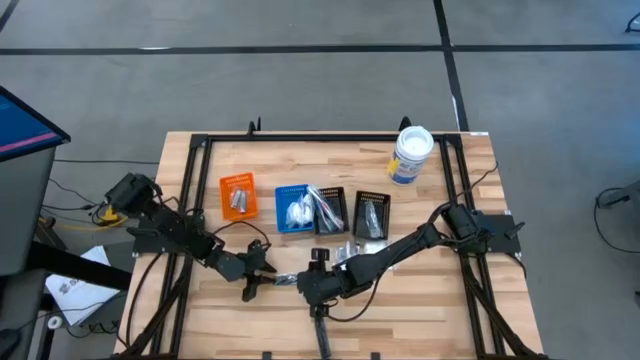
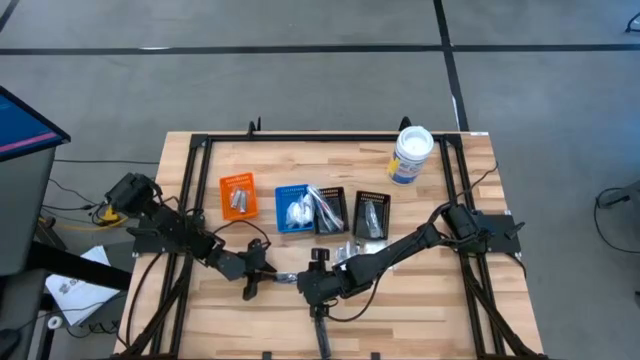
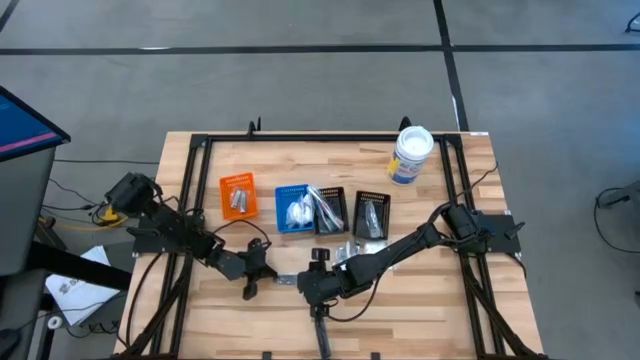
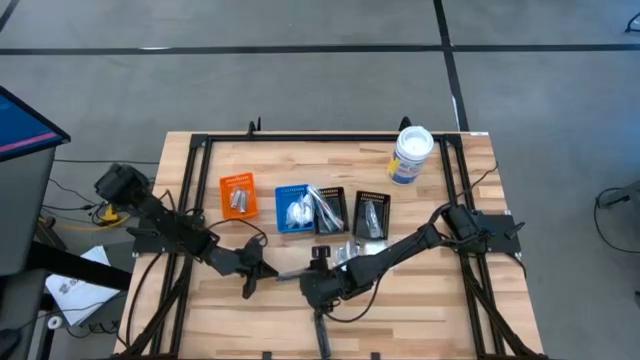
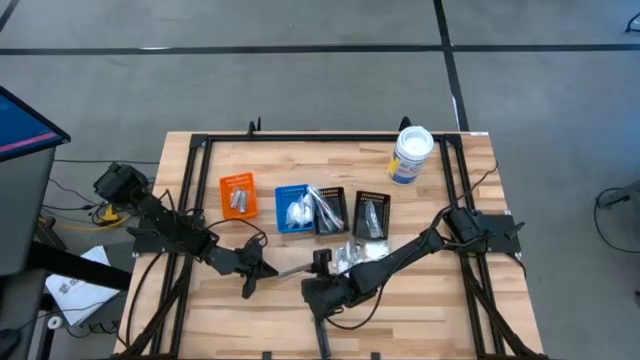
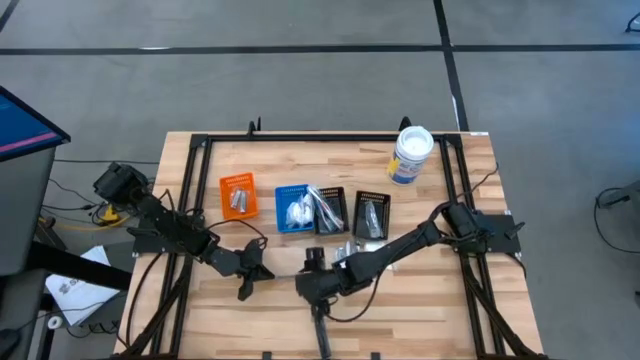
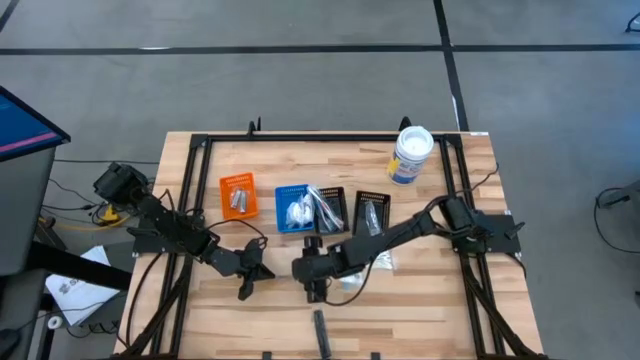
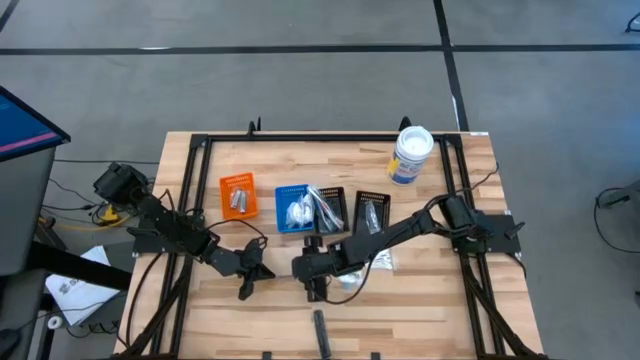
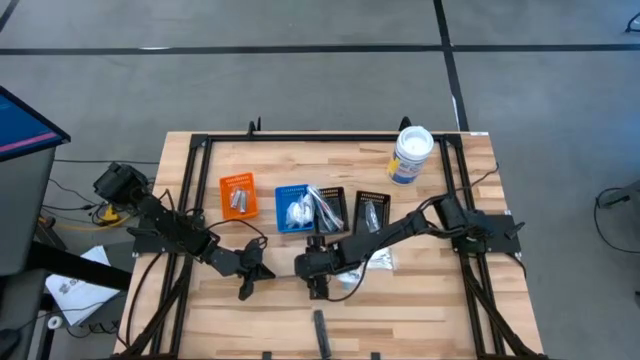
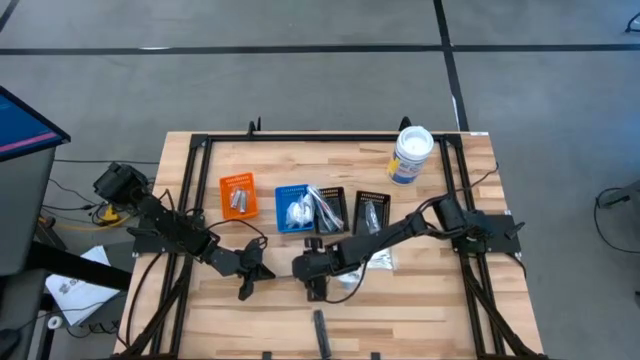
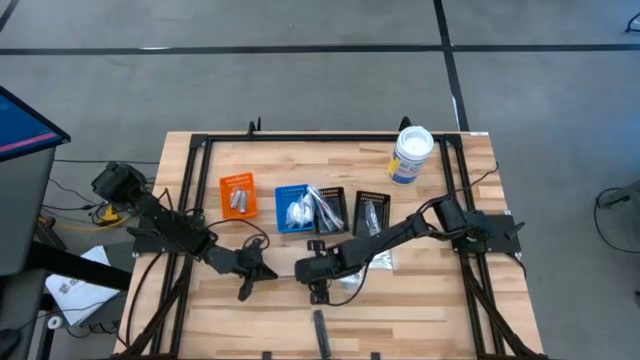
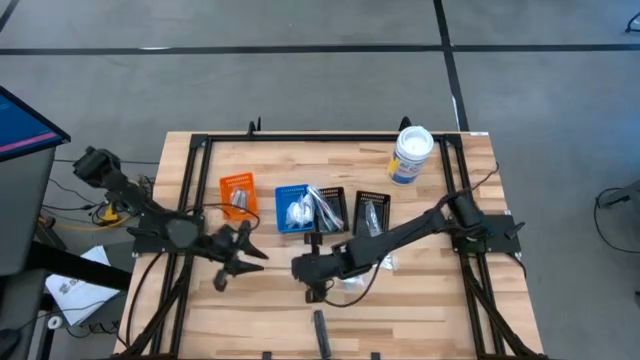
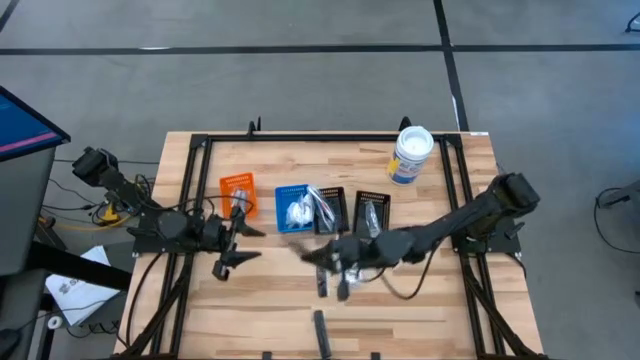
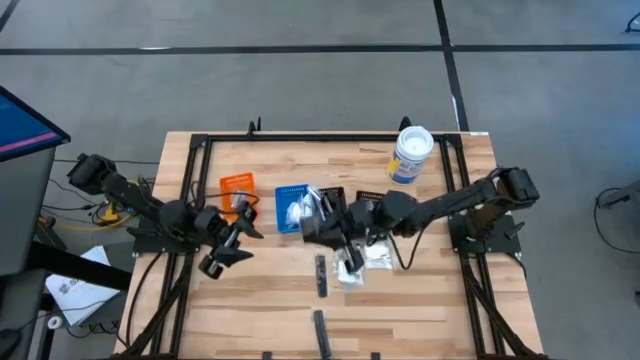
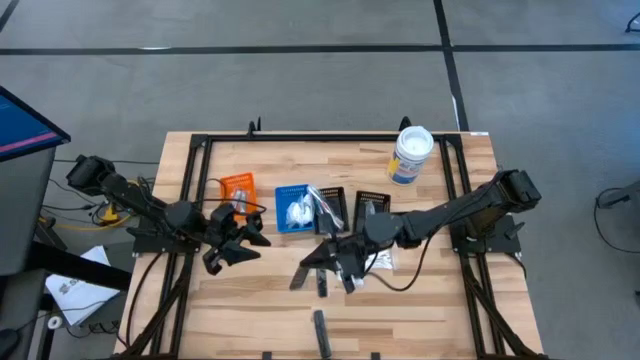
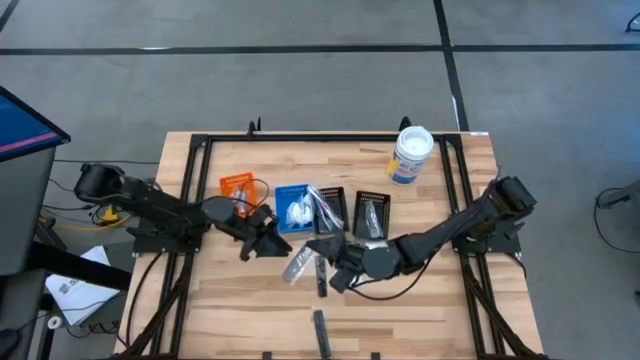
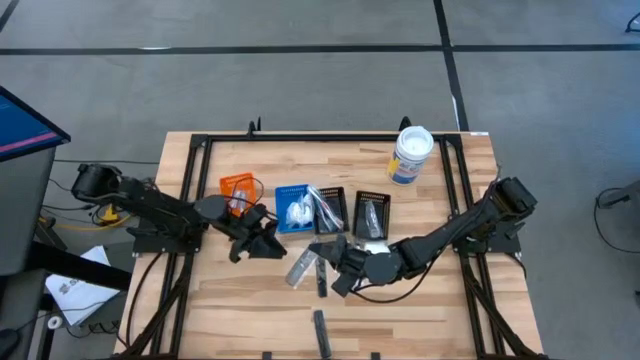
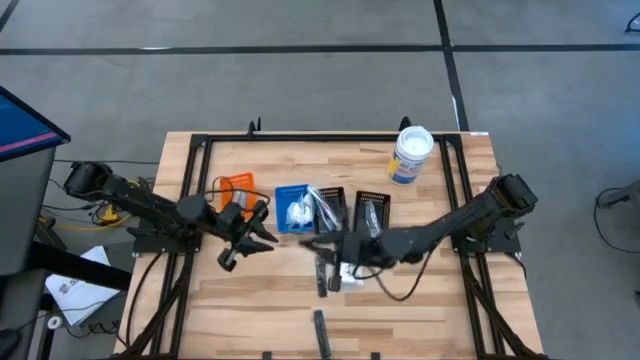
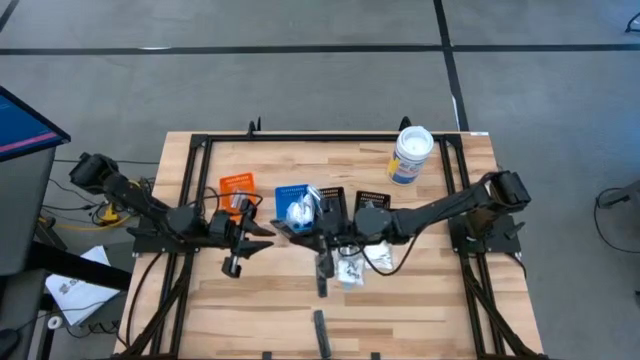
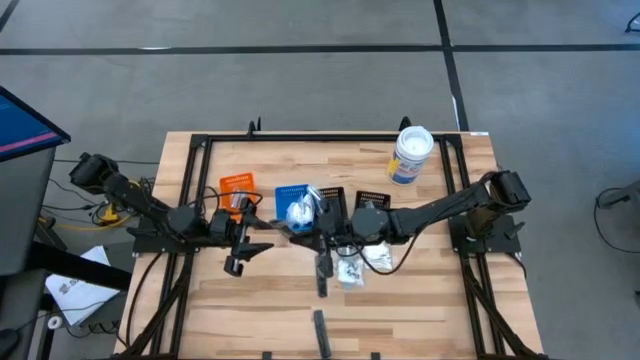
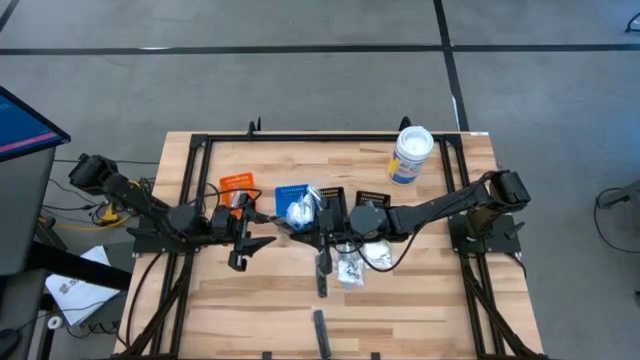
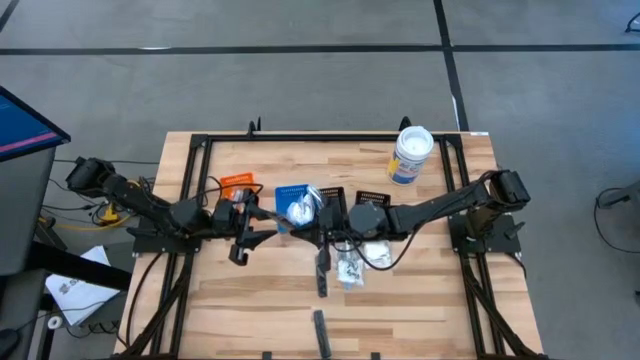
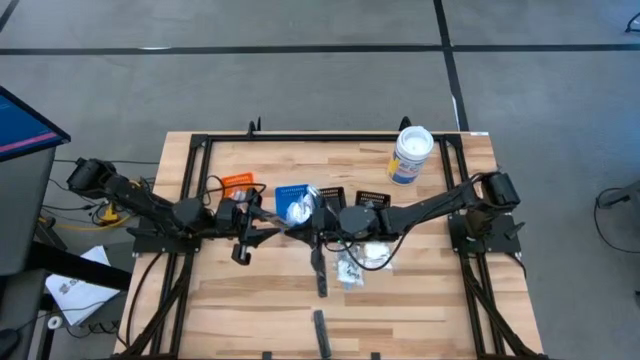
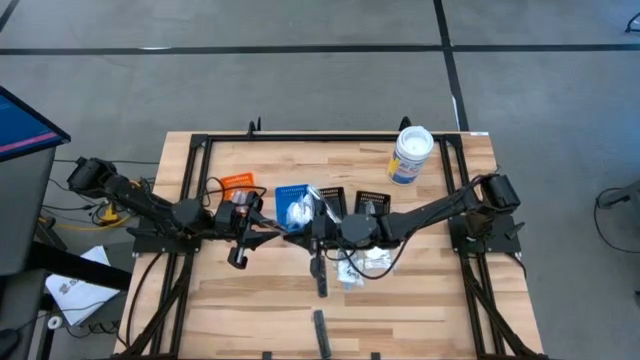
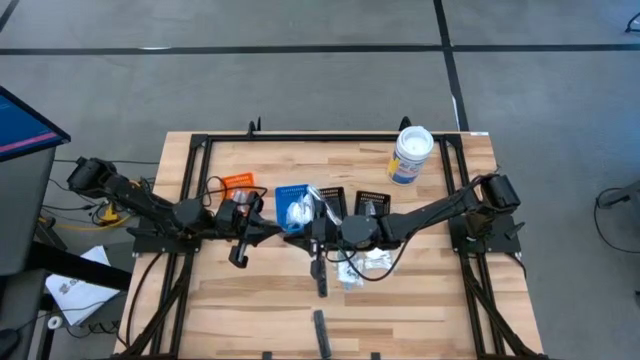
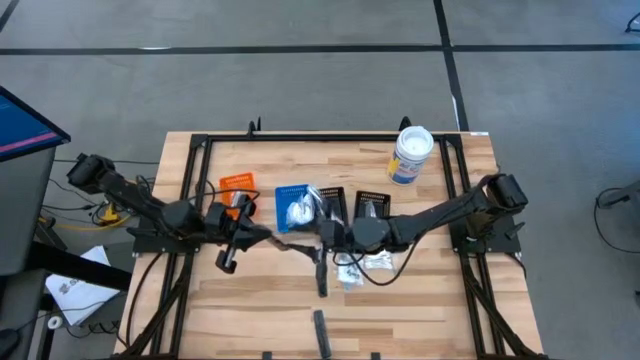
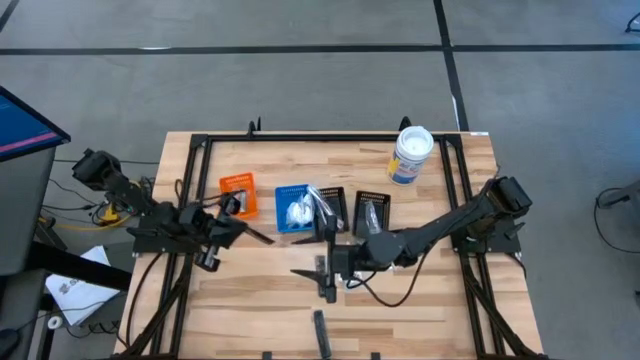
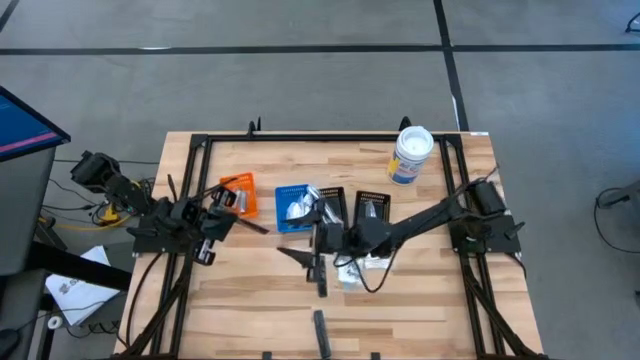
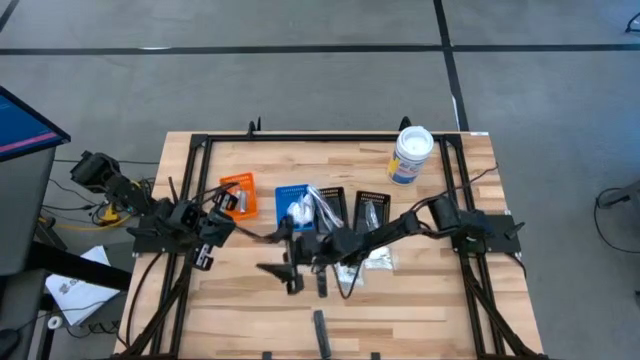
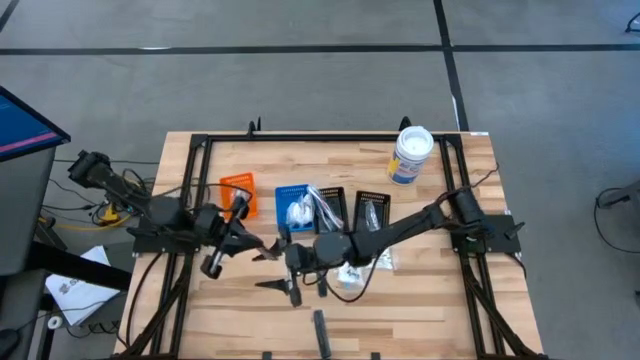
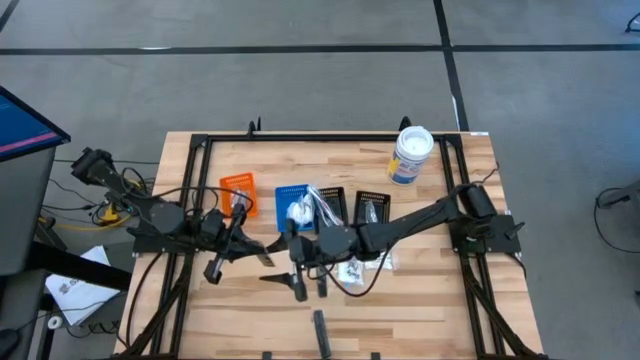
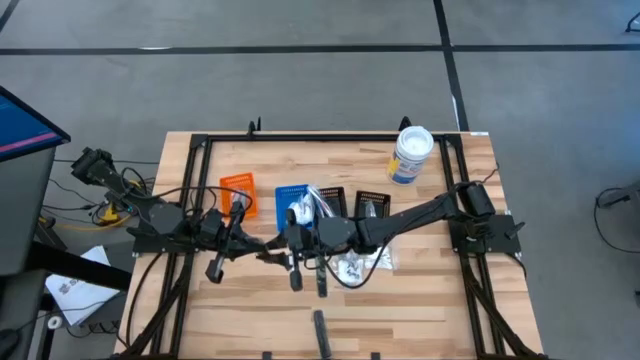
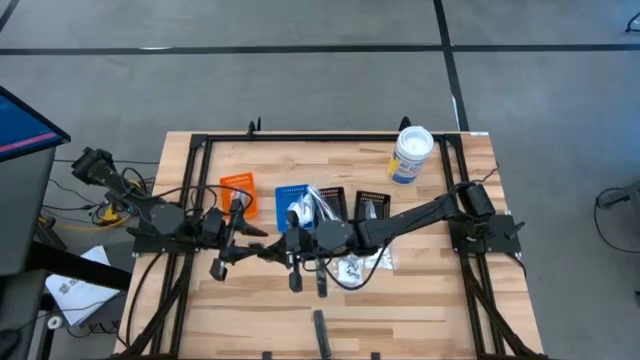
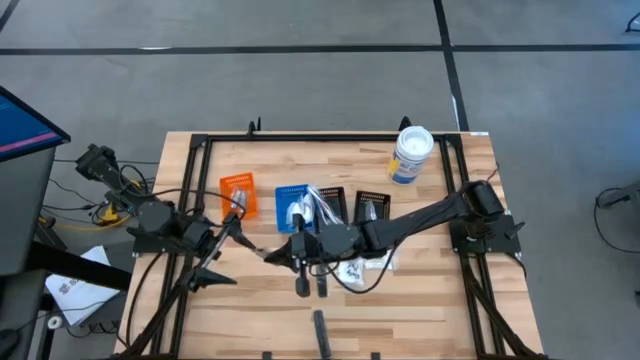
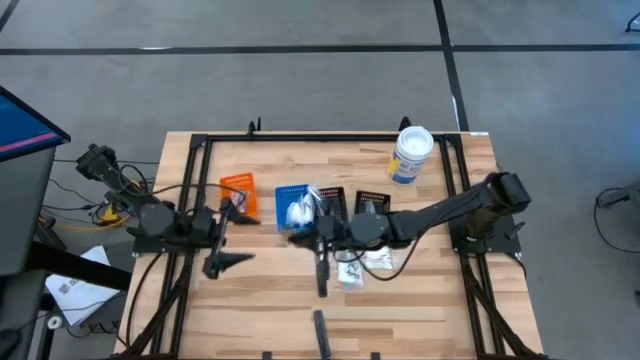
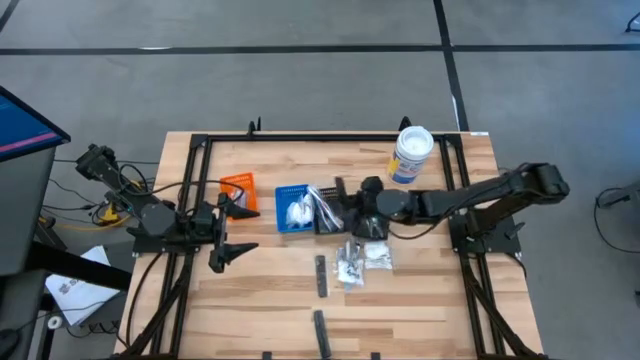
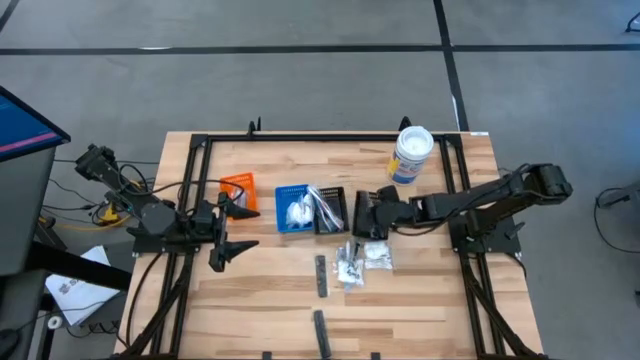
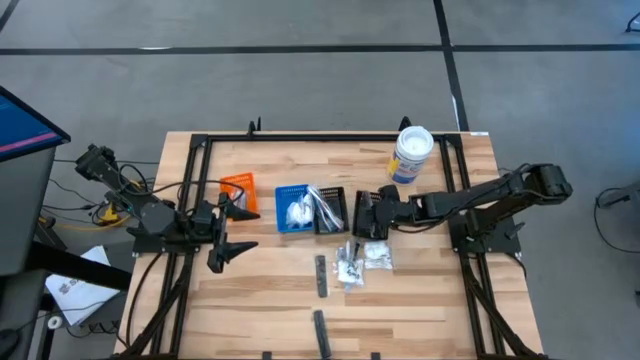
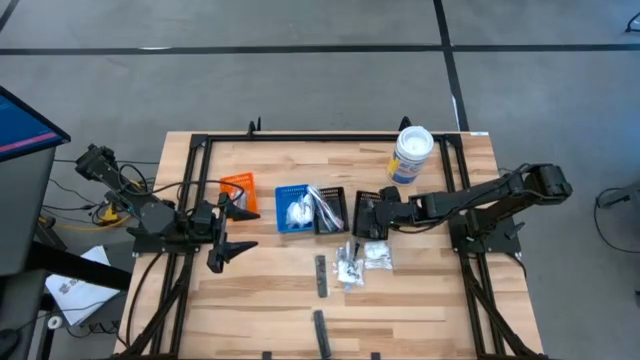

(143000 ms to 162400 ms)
Task: Pick & Place Travel size toiletries
Put the black comb into the right black bin

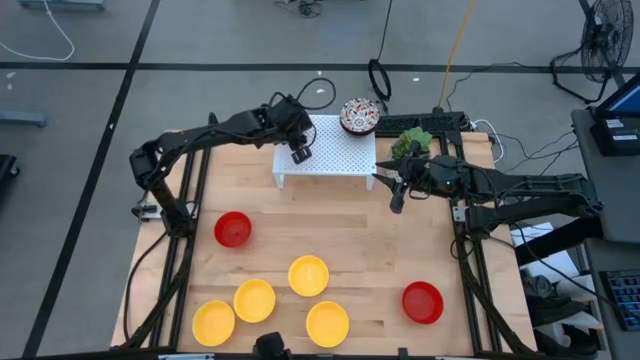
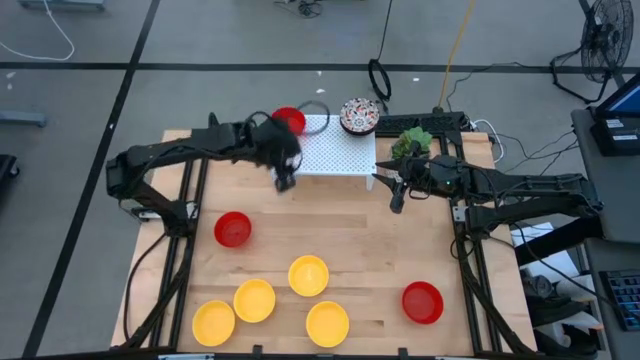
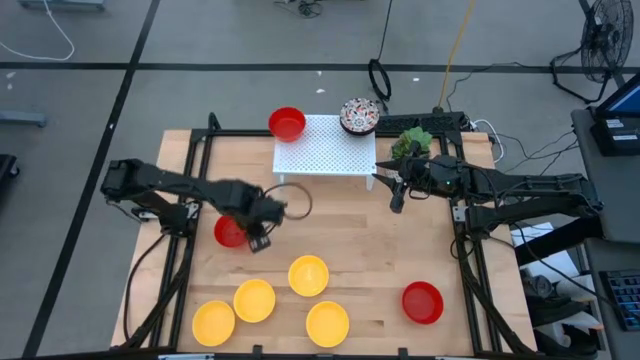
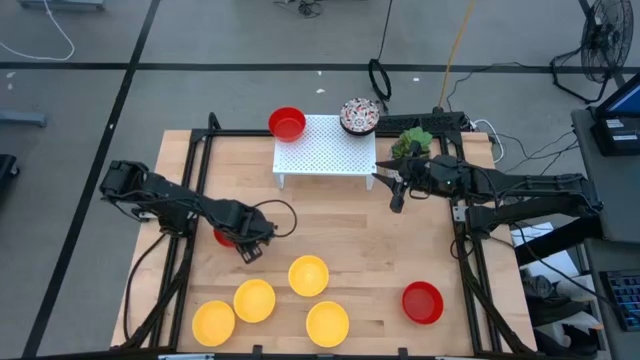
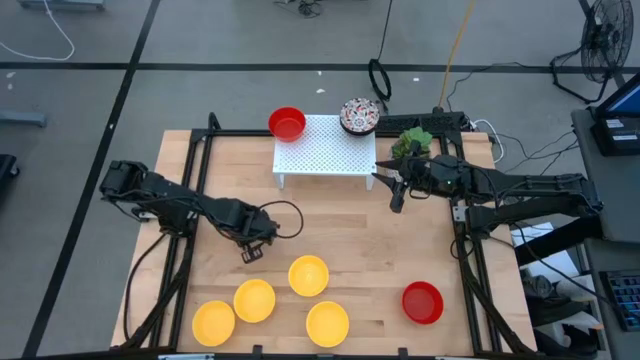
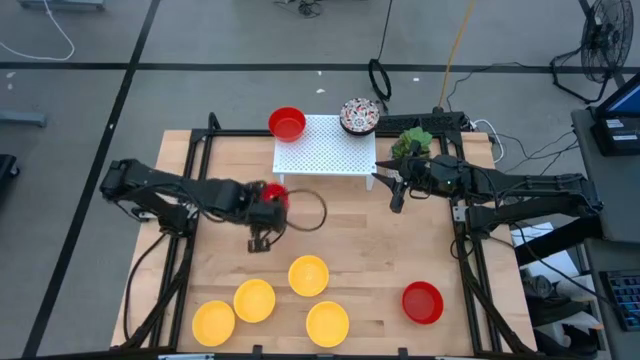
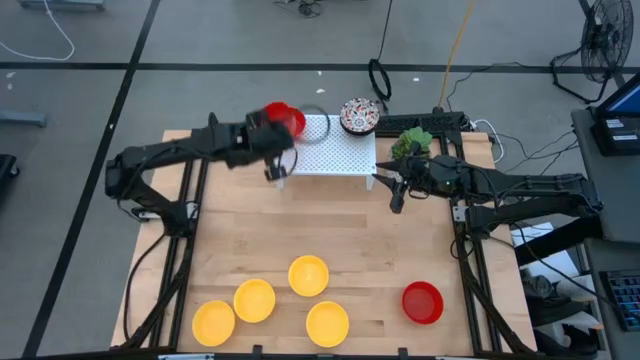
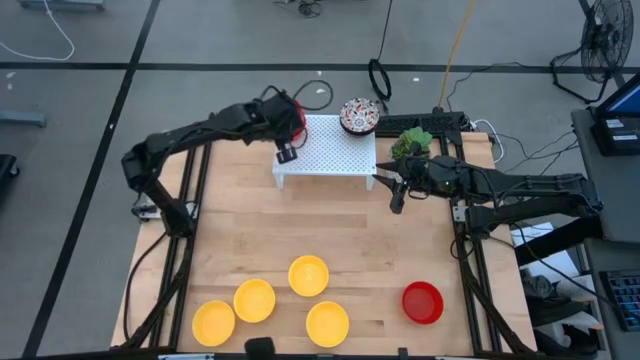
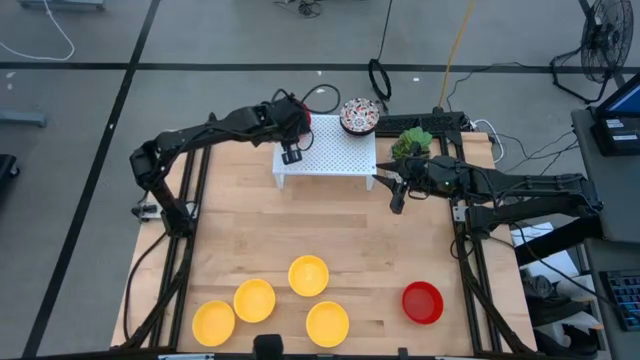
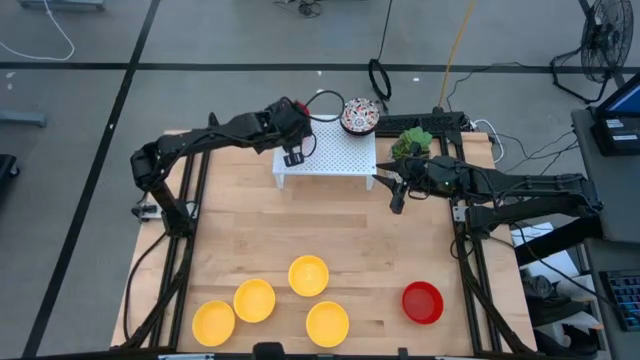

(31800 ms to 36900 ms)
Task: Pick & Place Mini bowls
Stack the red bowl on the red bowl on the shelf
